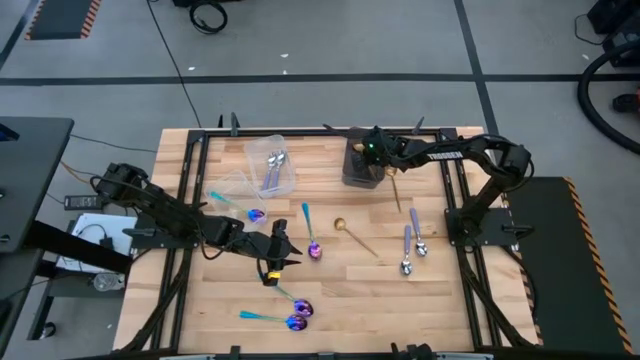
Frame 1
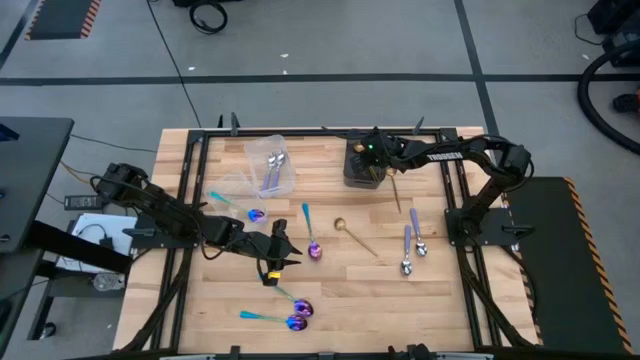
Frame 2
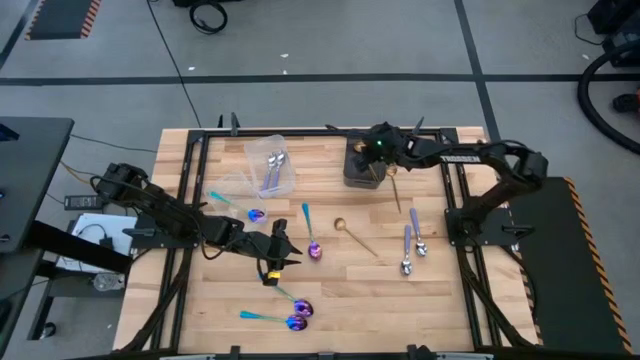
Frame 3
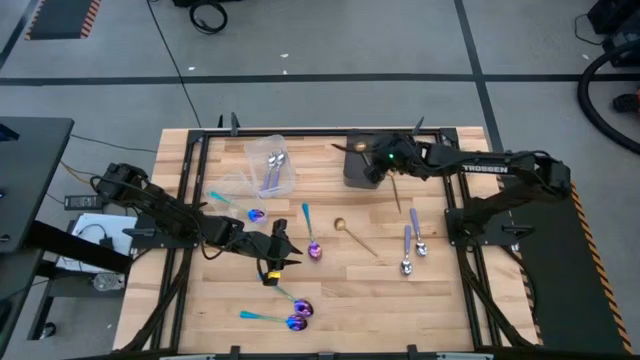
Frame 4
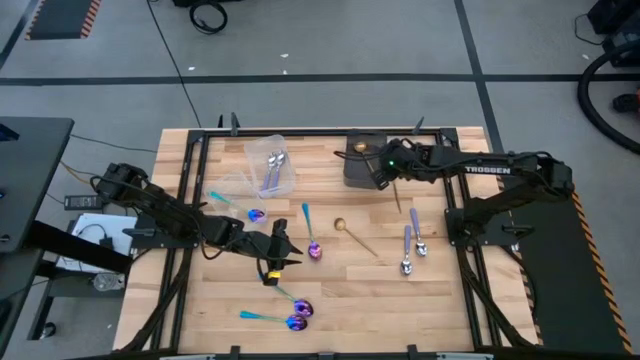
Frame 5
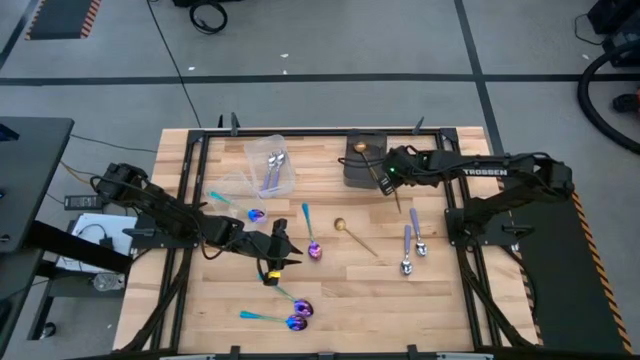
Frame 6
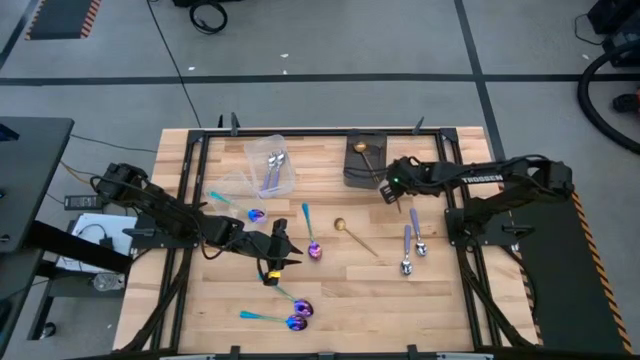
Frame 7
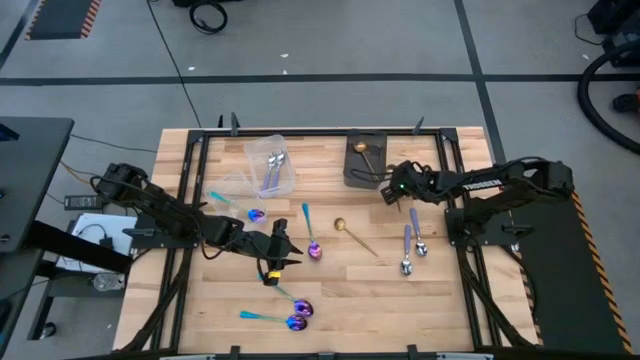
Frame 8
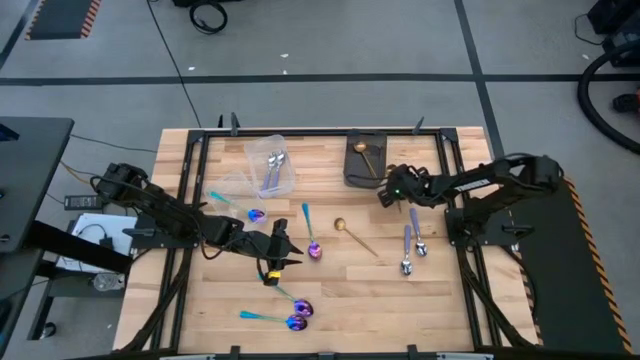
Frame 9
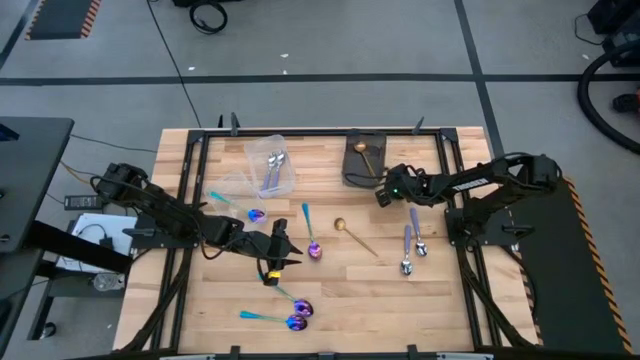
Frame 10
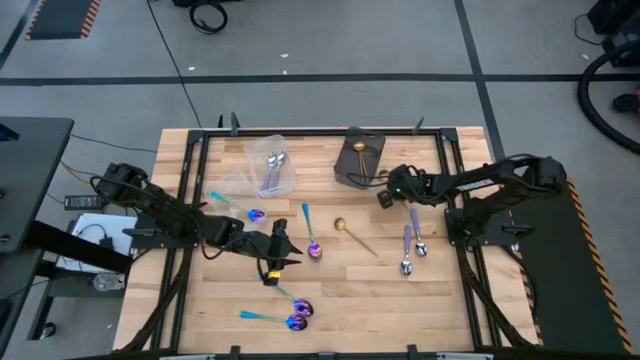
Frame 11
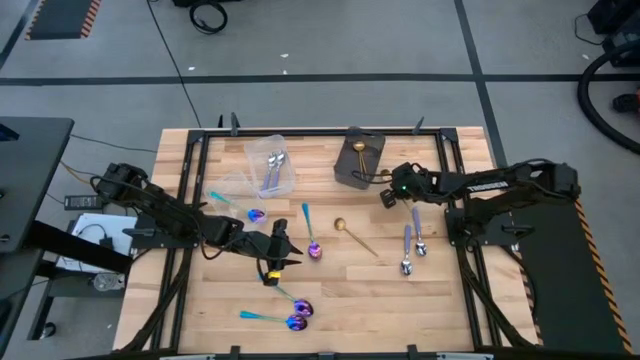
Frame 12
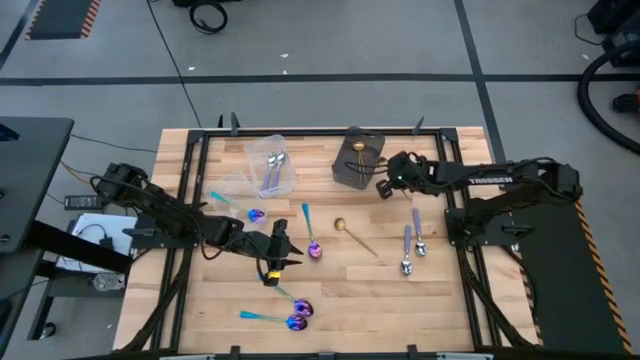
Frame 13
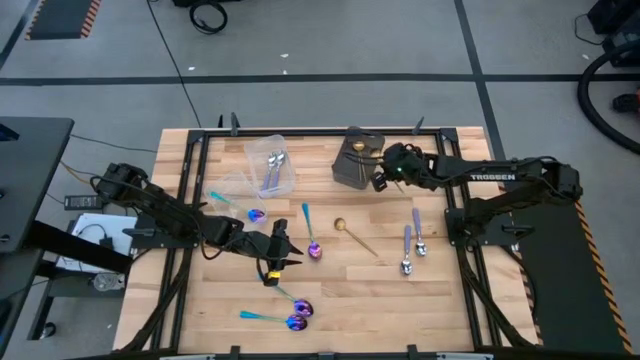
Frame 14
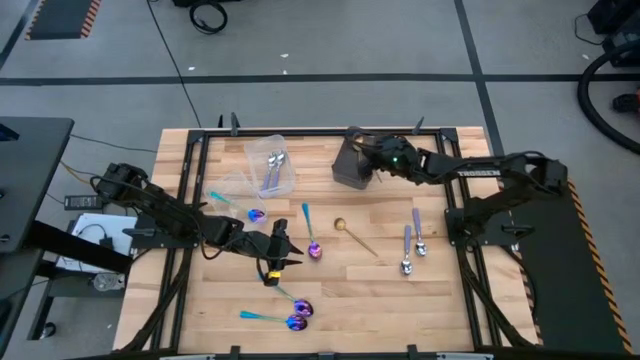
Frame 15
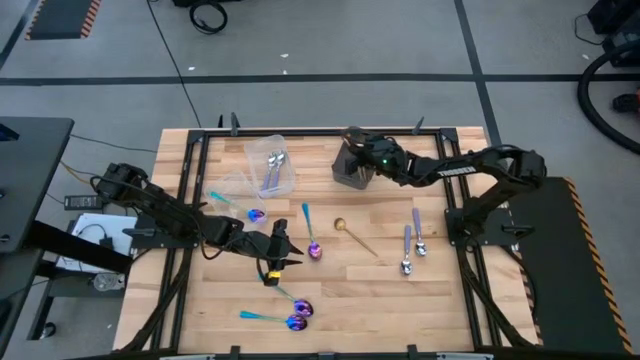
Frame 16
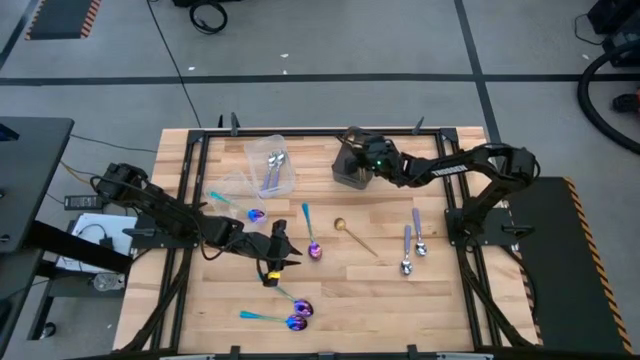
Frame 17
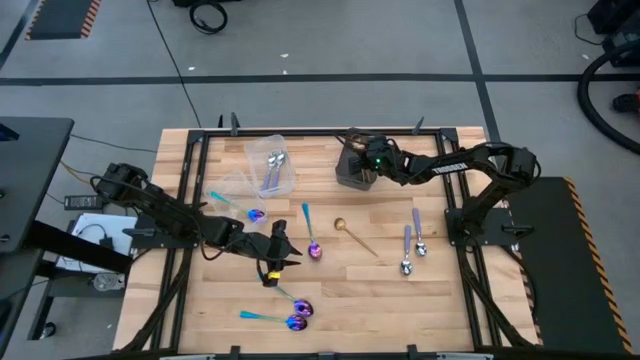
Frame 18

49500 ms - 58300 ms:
Task: Sort silverware by color (type)
Put the gold spoon into the black bin

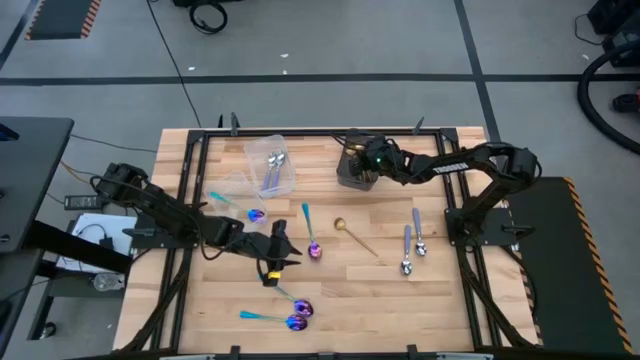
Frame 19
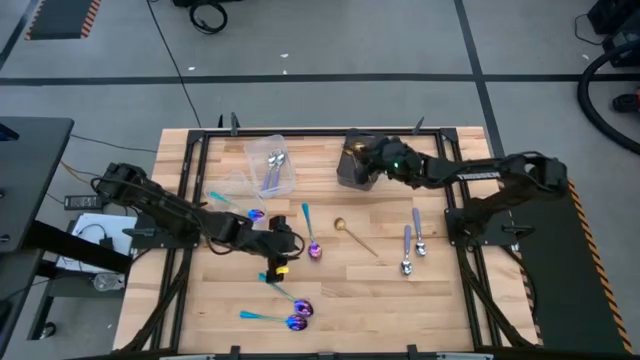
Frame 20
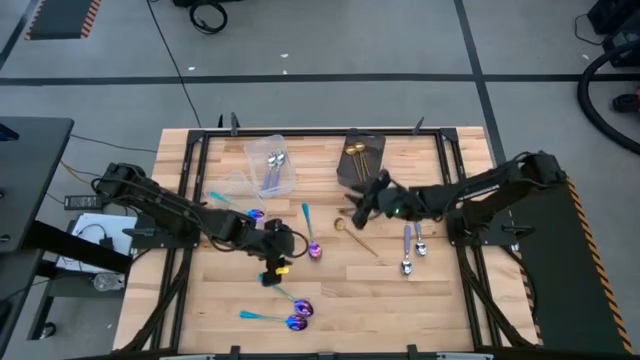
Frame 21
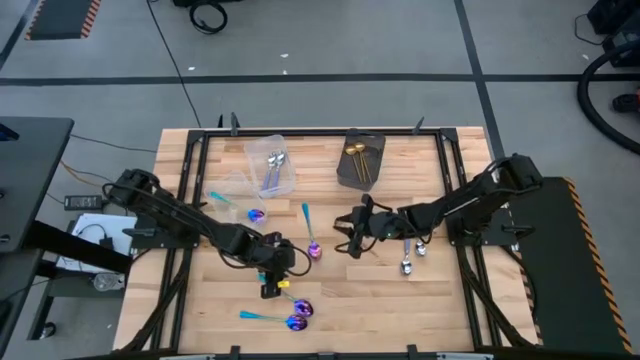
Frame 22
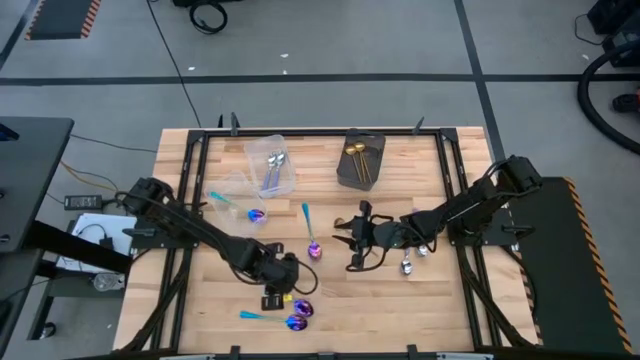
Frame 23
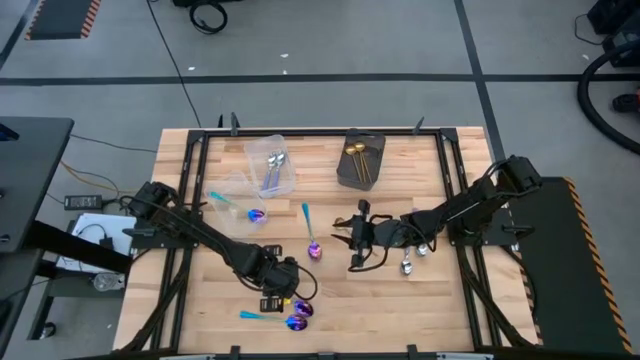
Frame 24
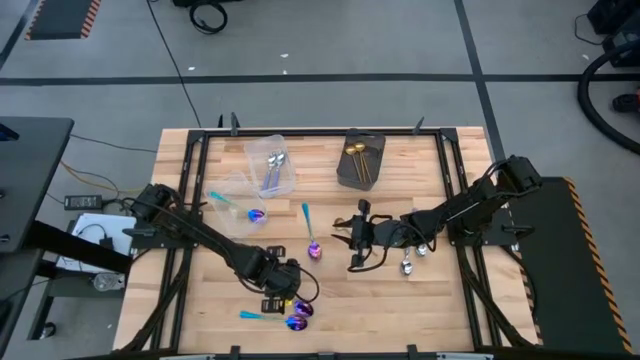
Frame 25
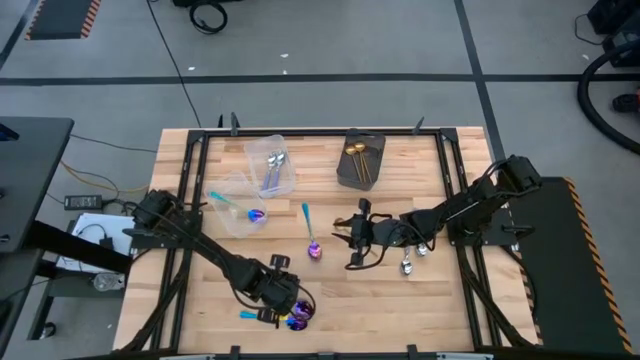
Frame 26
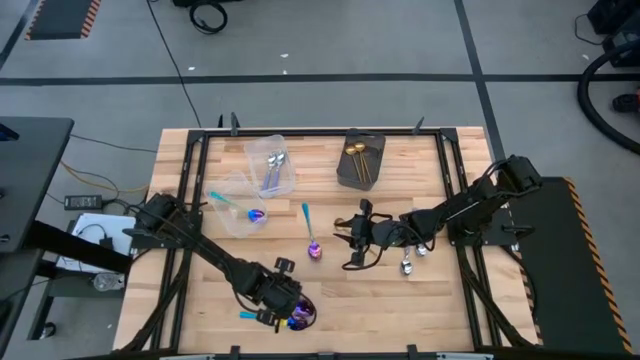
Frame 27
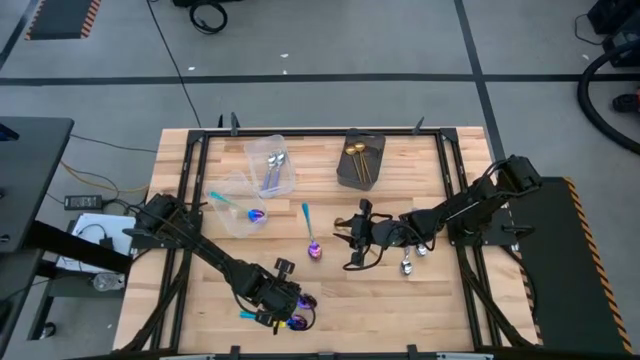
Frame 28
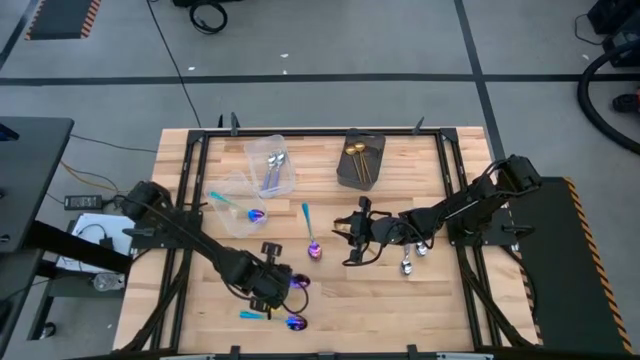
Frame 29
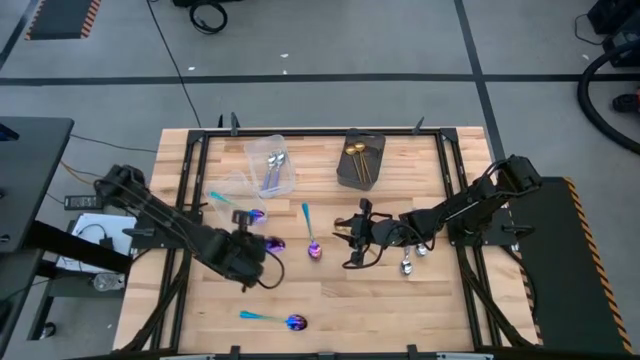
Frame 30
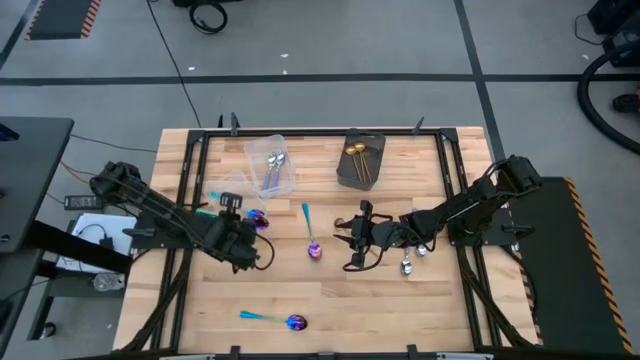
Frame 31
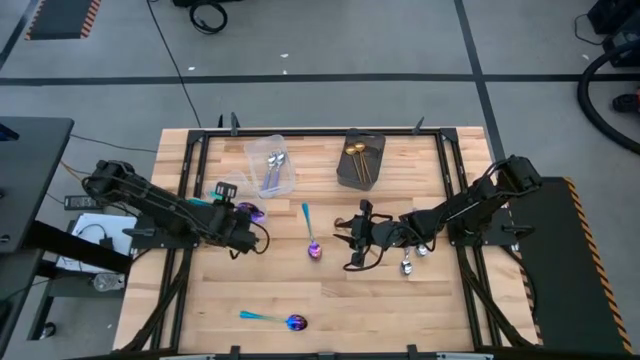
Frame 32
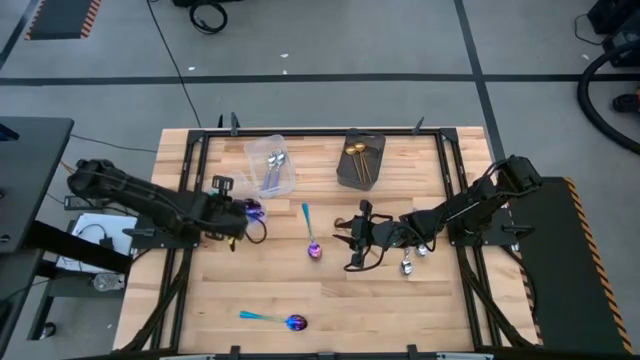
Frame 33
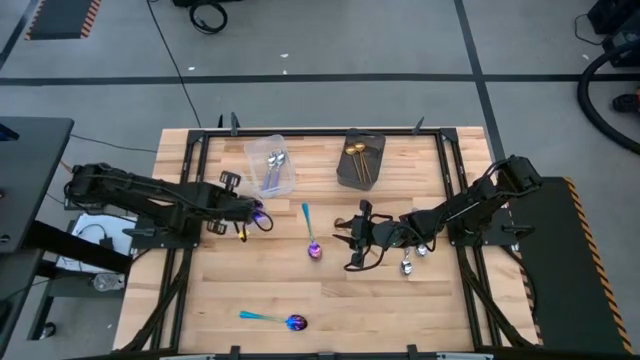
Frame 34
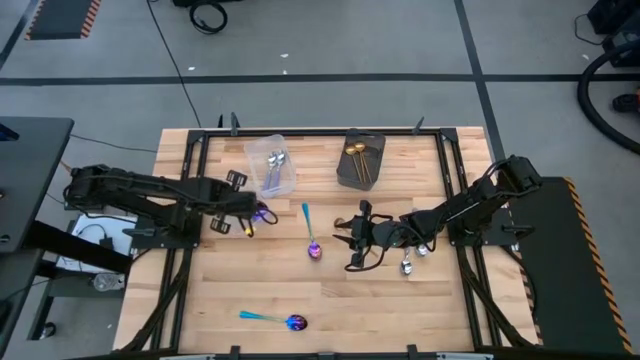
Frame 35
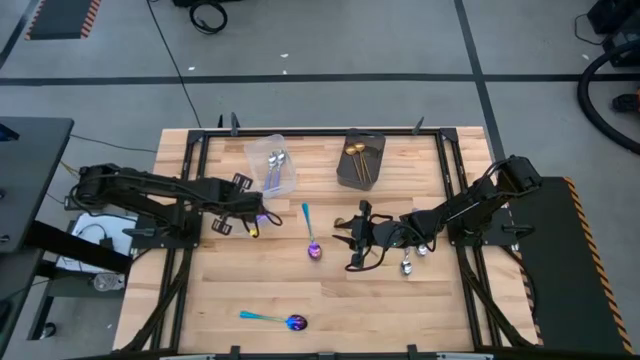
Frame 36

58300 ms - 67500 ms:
Put the blue spoon into the left transparent bin

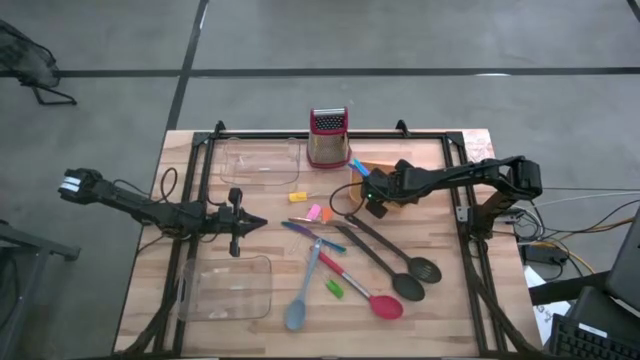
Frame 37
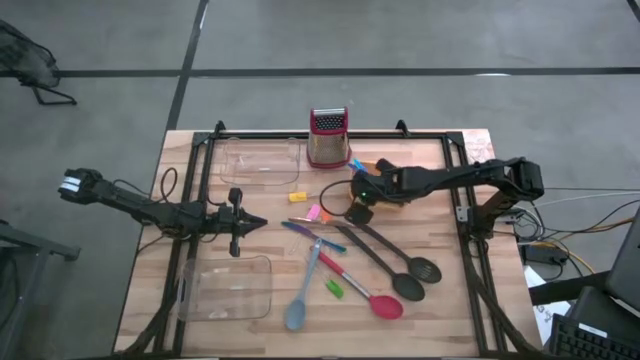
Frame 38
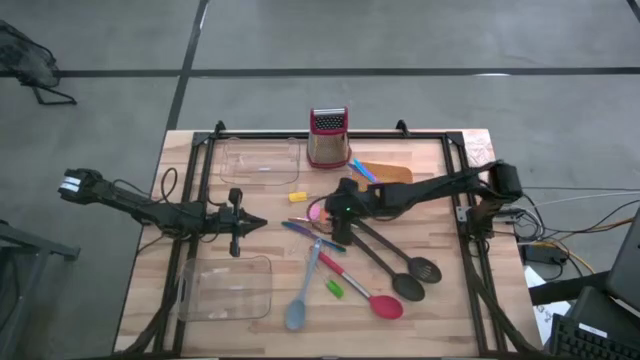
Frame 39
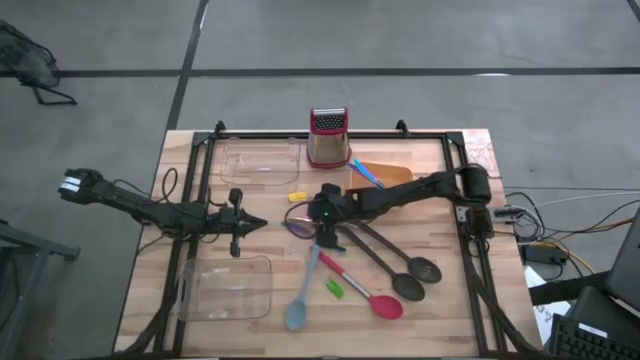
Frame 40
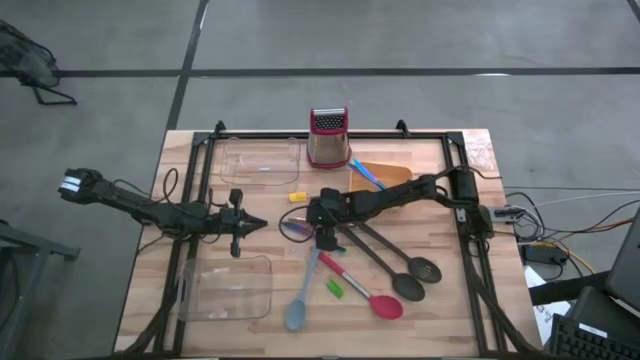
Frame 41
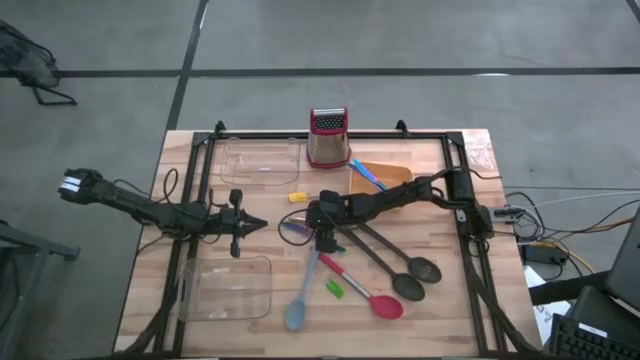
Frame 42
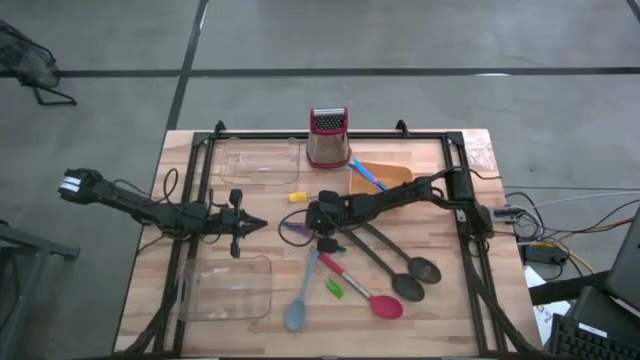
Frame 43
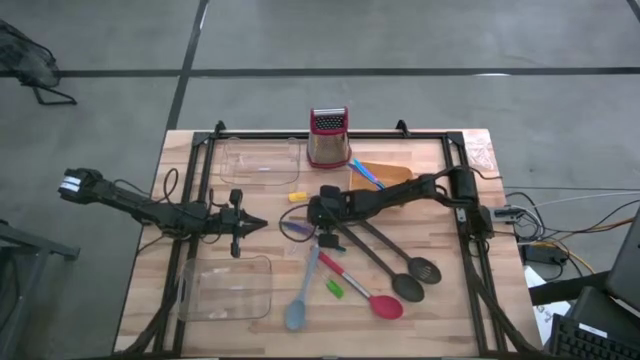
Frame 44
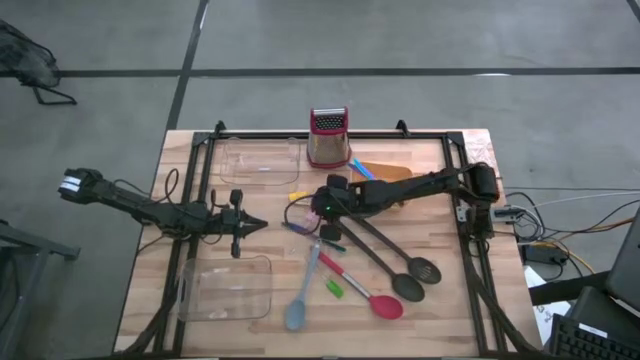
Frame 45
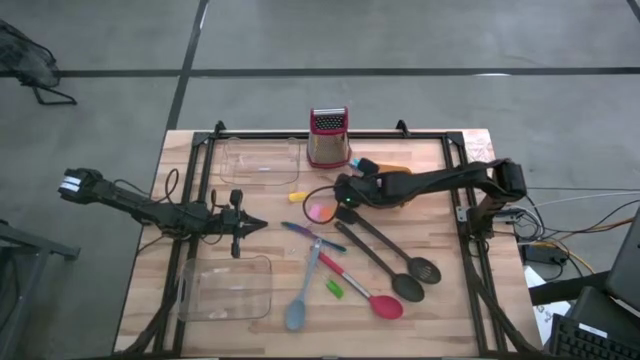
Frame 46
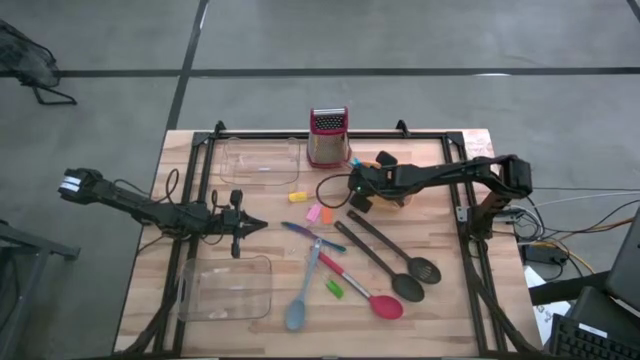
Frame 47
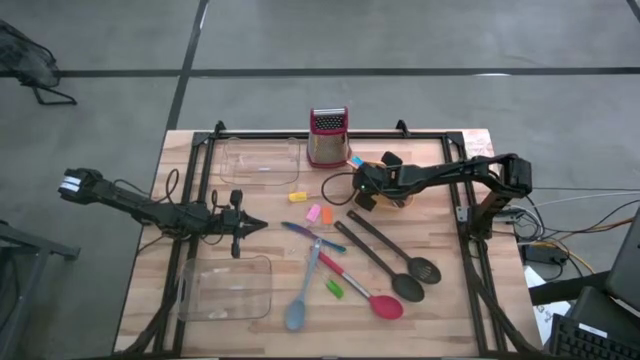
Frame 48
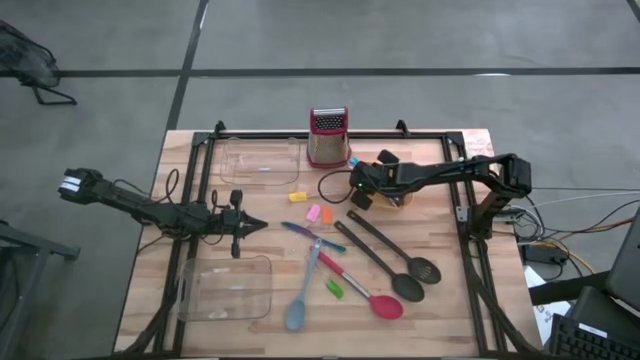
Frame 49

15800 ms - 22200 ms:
Task: Pick & Place Kitchen Items
Put the gold knife into the yellow bin
